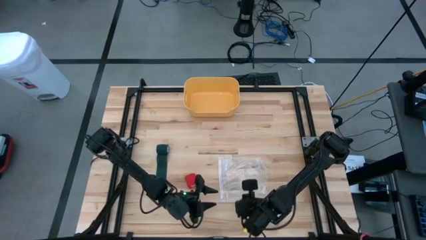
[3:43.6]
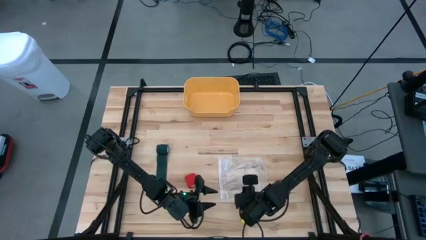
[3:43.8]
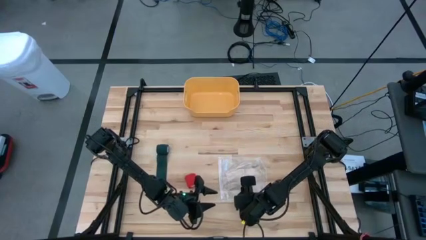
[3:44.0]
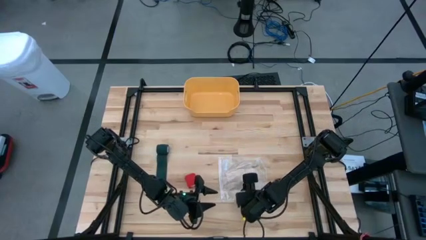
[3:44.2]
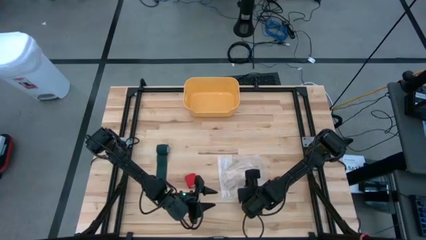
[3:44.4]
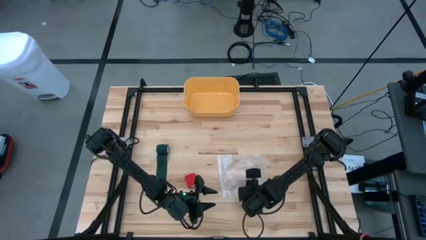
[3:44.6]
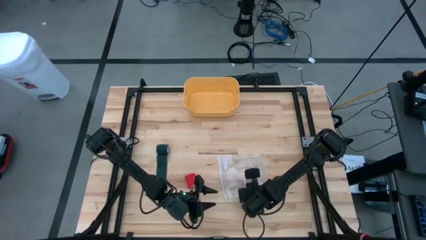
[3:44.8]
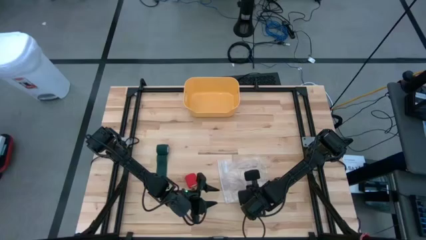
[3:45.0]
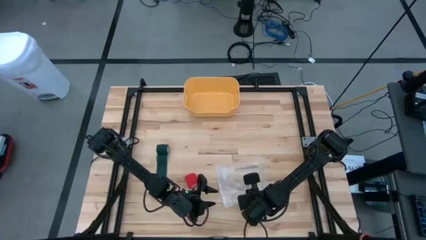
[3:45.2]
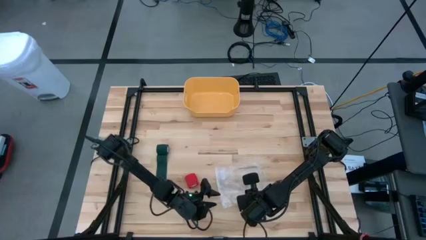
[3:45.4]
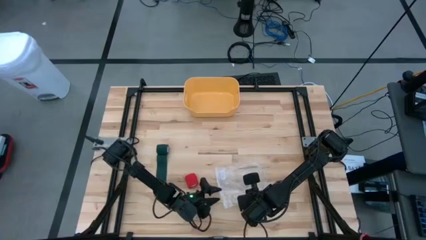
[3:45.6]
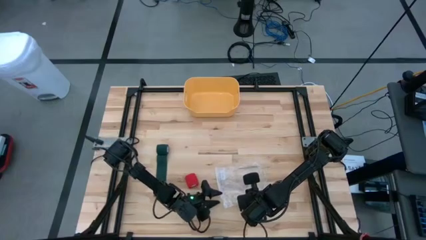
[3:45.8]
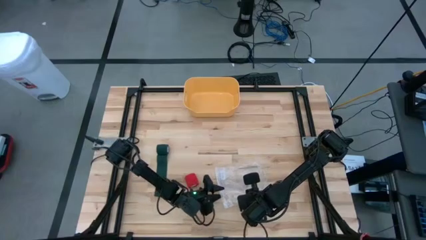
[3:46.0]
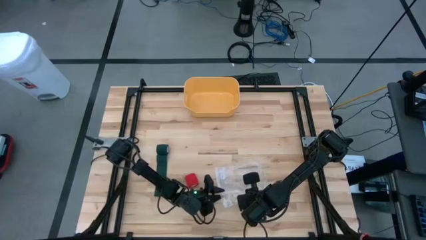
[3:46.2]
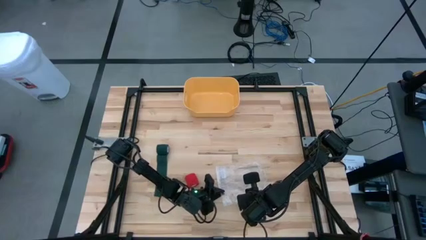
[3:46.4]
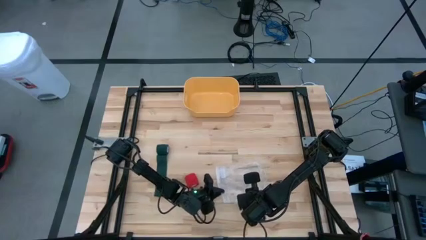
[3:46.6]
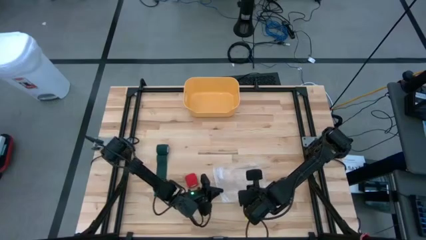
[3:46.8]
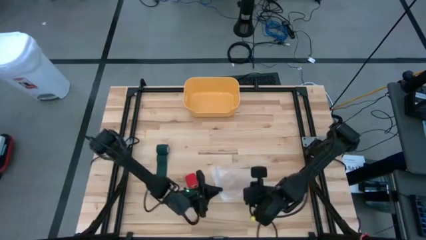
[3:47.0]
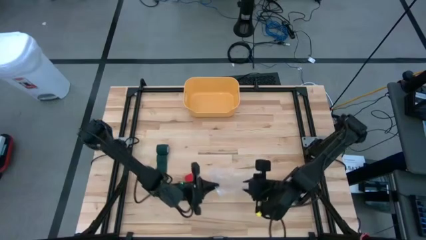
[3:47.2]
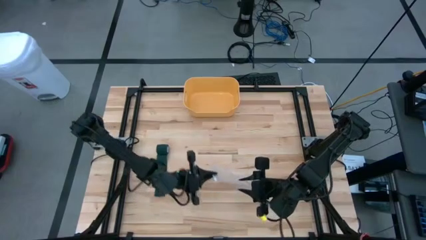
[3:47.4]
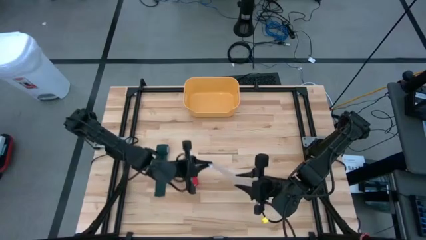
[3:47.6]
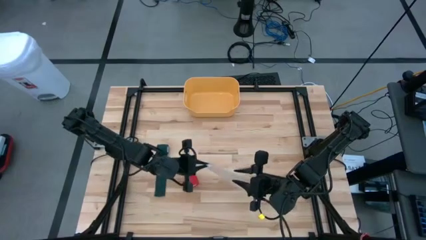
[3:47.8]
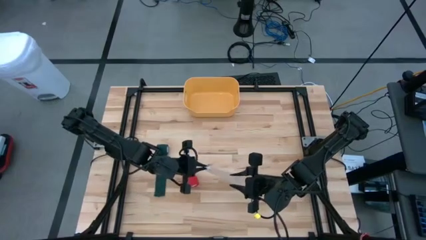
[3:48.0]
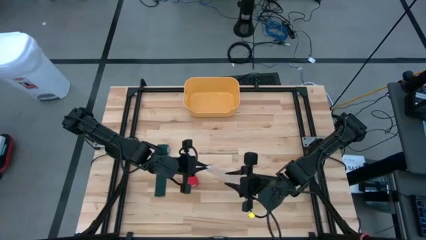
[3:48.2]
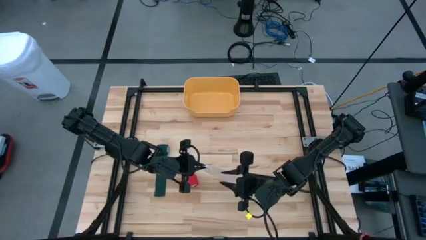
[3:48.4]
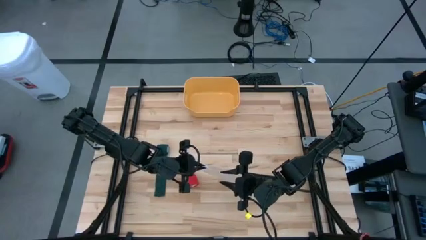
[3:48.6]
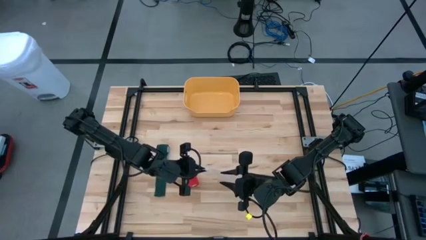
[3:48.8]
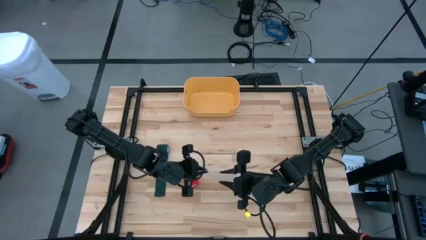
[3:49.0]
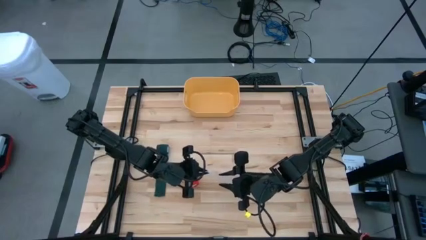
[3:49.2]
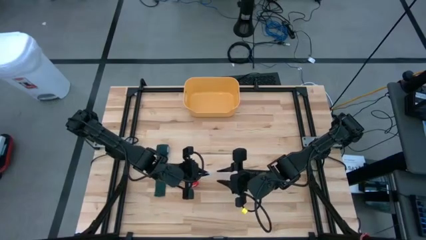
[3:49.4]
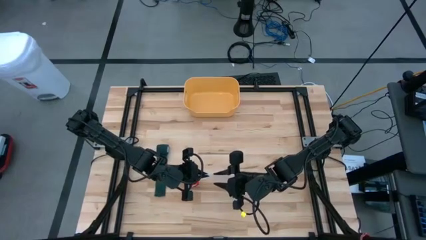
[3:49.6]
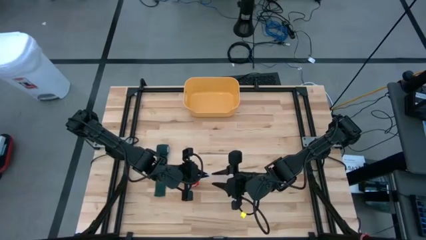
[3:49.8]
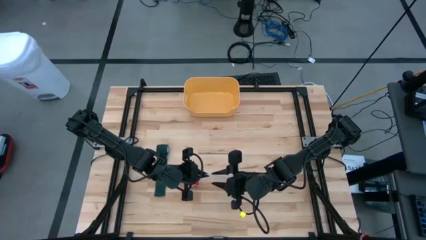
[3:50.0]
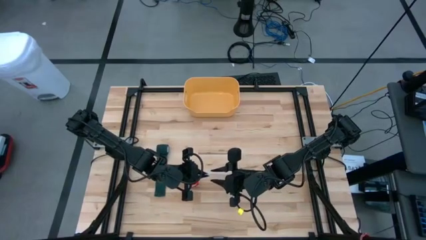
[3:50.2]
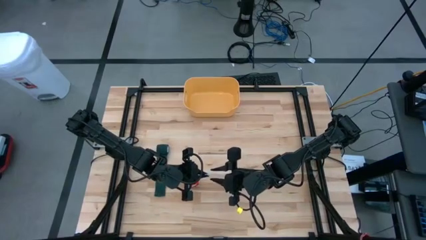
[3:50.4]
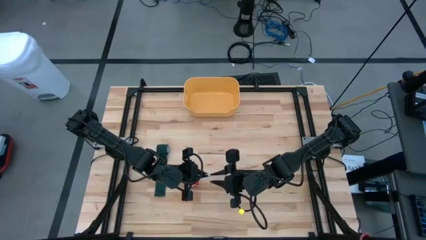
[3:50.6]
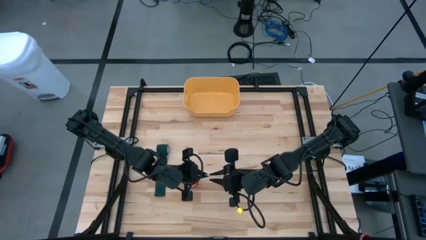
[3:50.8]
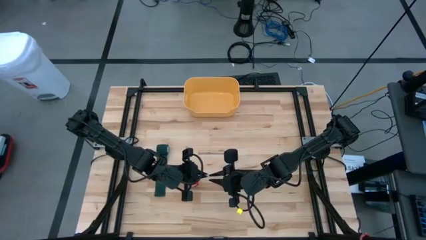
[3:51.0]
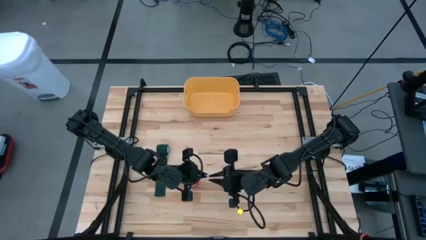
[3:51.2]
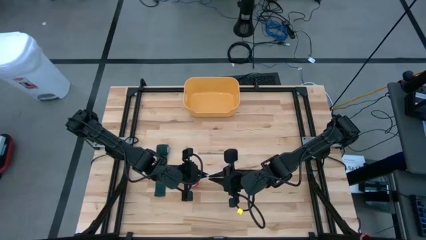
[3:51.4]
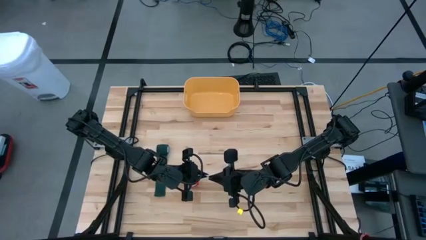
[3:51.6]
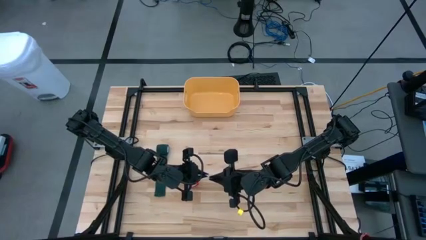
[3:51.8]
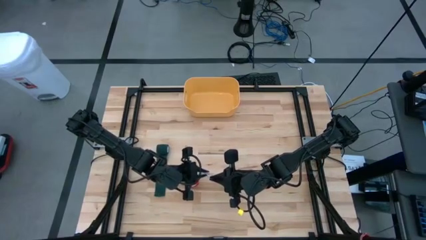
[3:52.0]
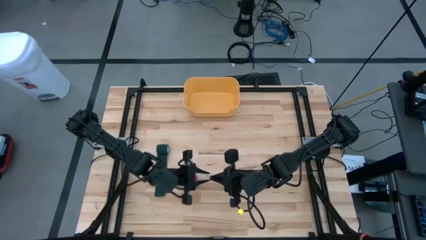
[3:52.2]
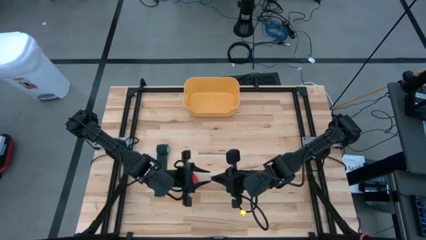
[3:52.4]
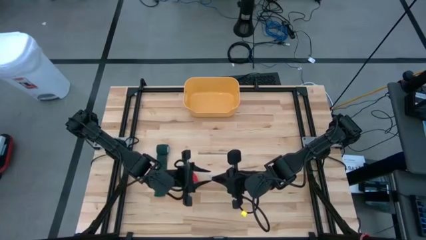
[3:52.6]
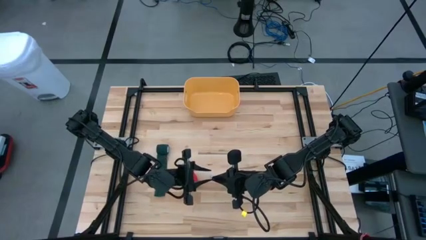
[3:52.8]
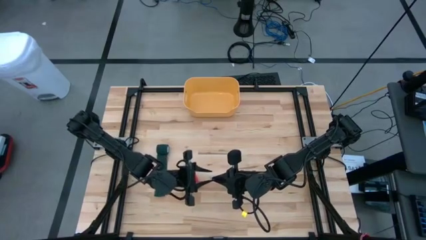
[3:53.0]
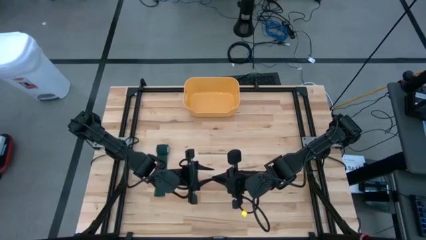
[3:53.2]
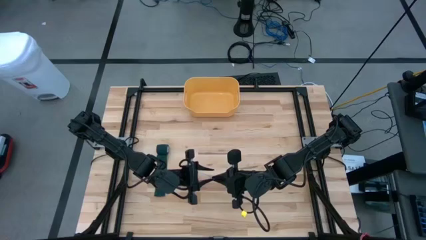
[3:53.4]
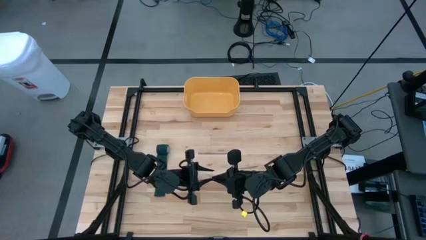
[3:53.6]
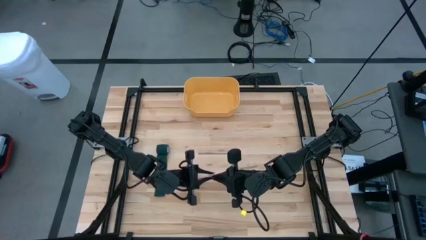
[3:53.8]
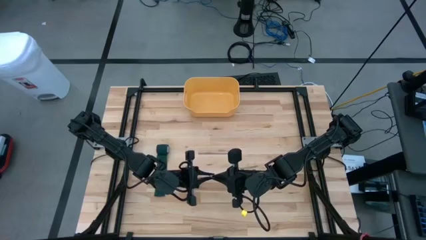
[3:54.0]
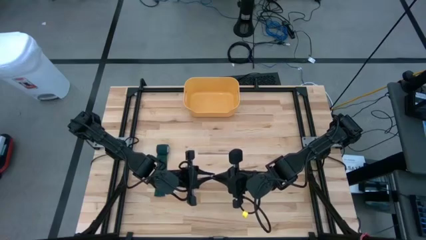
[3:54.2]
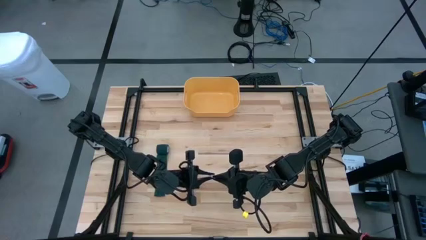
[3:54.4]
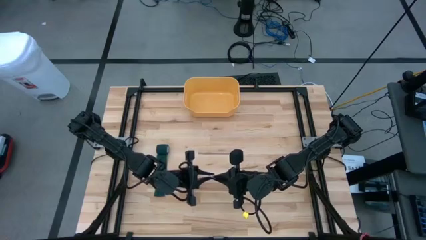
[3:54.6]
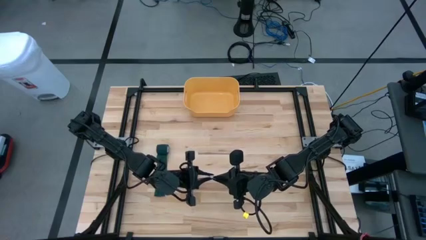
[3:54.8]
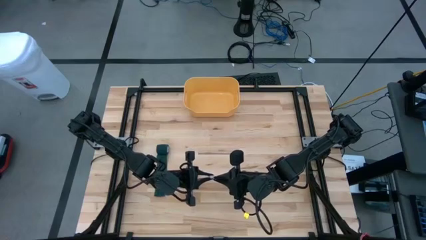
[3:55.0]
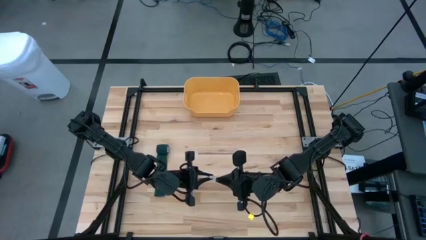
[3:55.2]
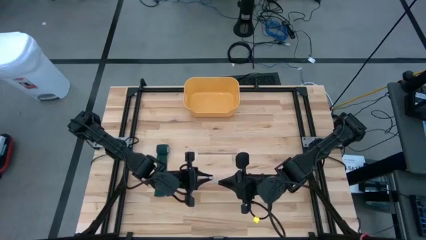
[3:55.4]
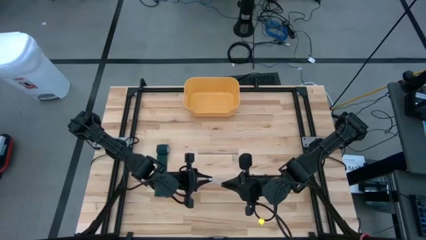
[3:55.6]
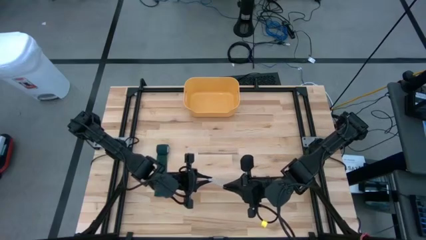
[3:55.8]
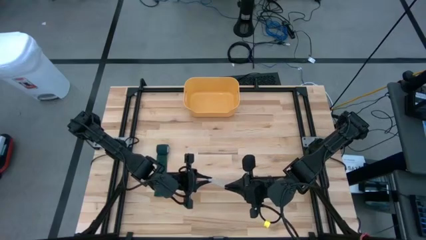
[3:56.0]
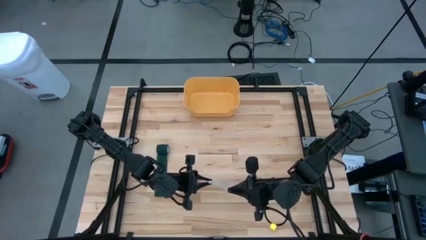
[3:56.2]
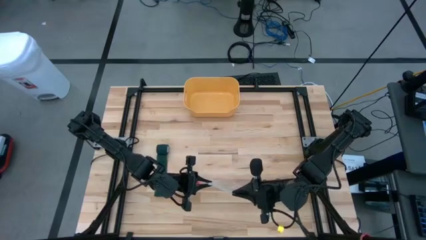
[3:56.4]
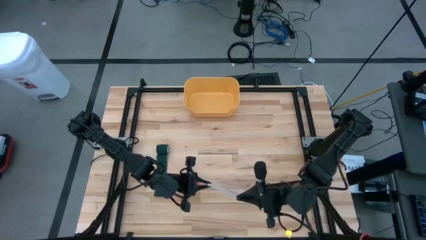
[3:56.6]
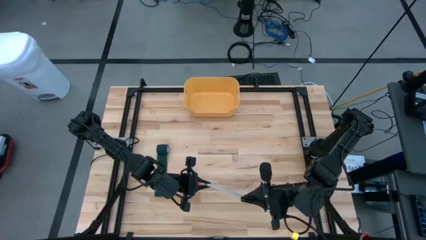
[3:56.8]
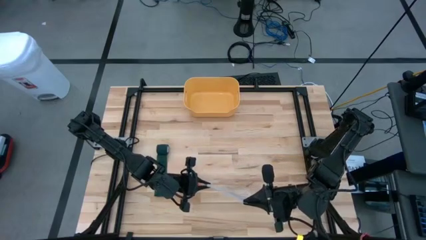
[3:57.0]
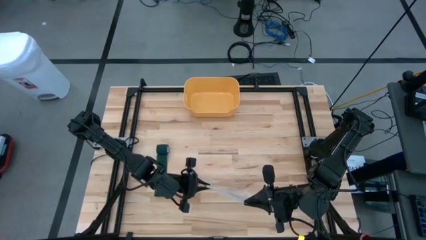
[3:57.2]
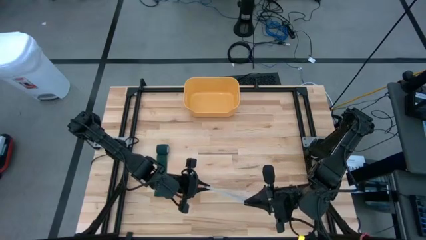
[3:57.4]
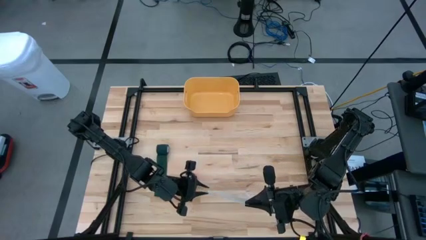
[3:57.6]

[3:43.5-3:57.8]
Task: Roll bandage
Open the transparent zip bag

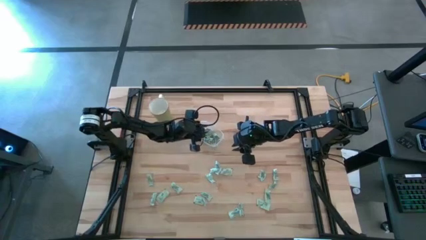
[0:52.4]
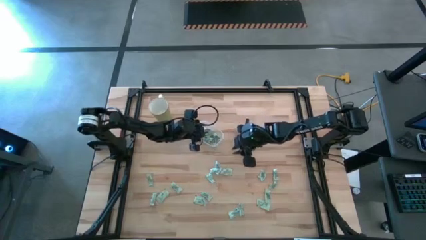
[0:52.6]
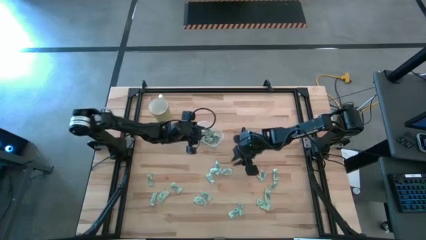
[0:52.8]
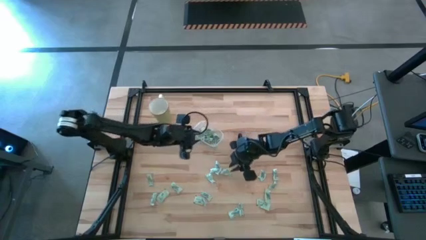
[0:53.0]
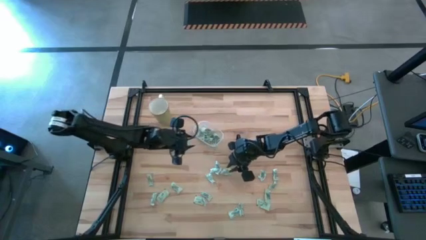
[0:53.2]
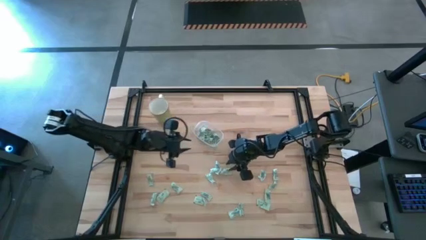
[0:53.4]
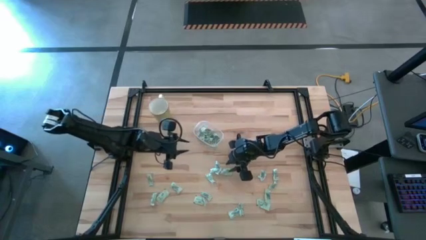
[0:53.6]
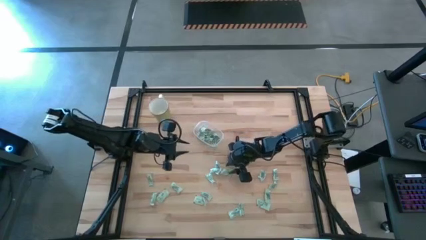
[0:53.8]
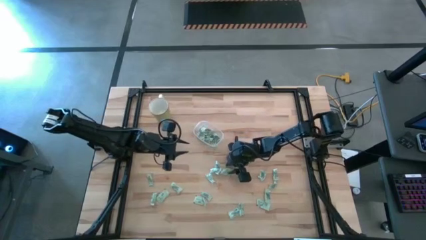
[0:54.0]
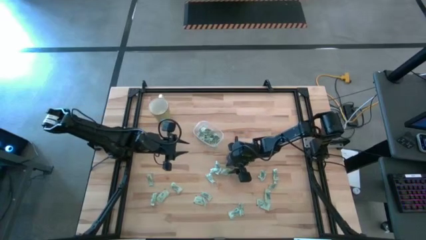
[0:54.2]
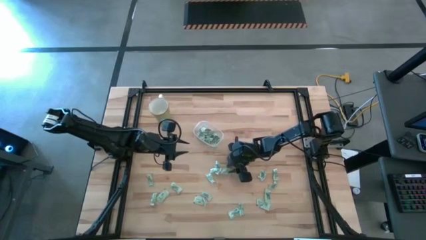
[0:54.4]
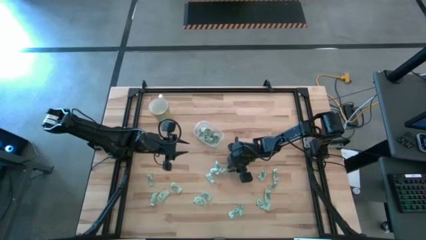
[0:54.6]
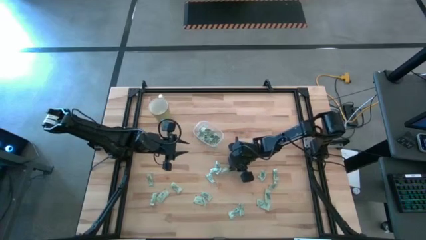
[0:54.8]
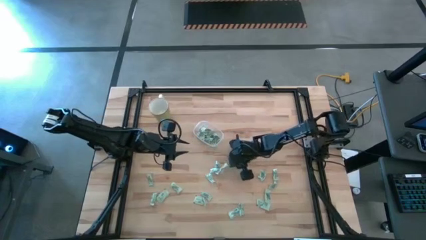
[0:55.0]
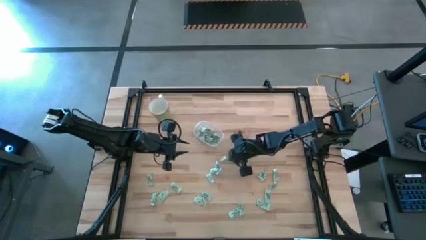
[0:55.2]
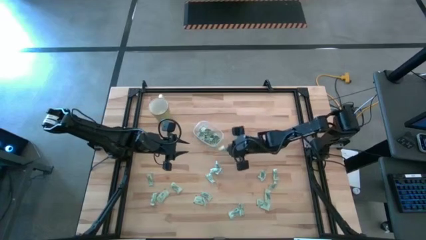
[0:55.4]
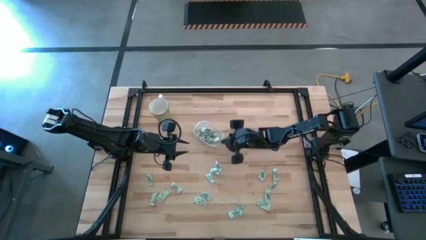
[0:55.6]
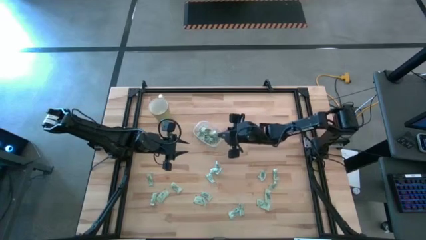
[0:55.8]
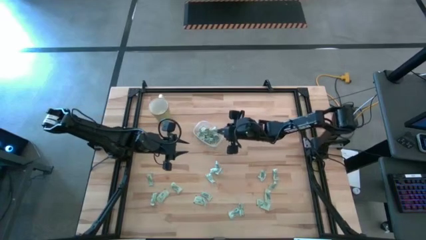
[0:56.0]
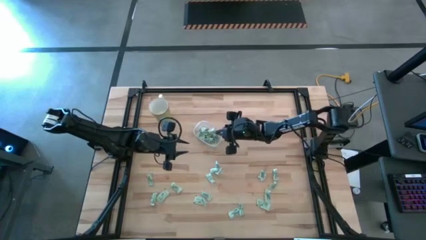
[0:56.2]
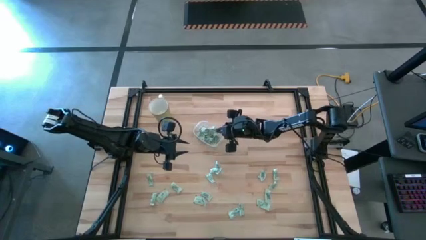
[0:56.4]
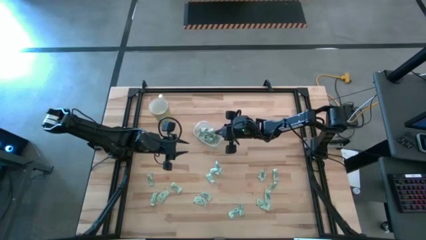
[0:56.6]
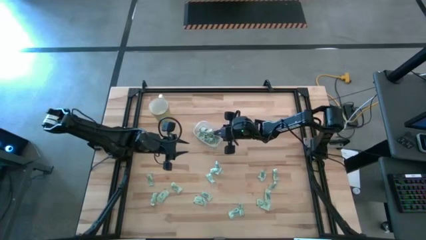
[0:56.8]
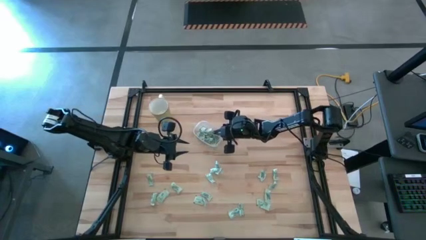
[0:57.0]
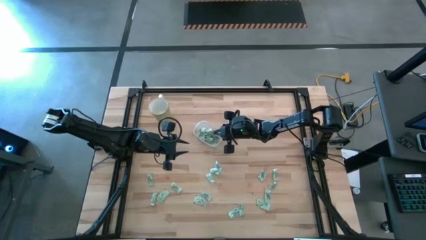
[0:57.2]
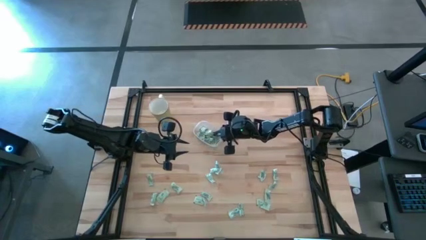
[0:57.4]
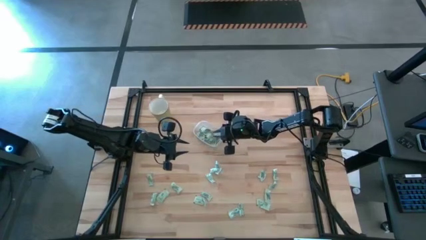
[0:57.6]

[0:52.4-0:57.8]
Task: Pick and place Stevia / Truvia into bins
Put the stevia packet into the transparent container
